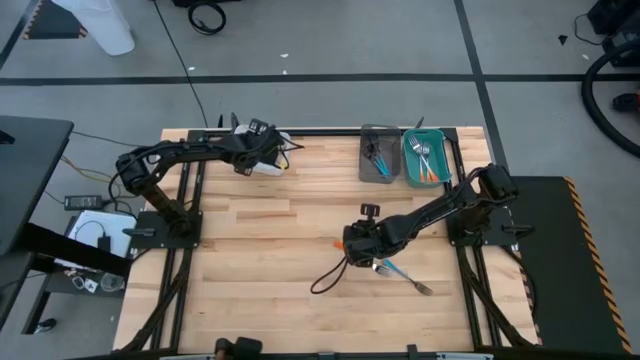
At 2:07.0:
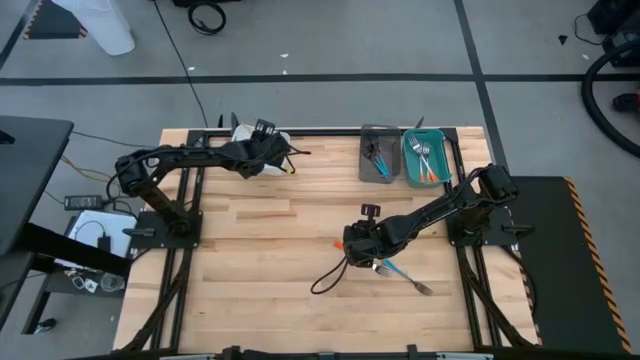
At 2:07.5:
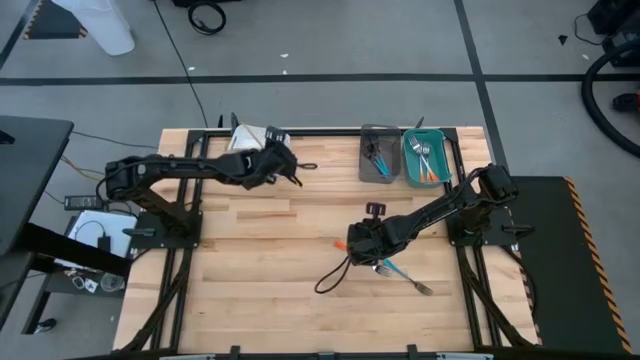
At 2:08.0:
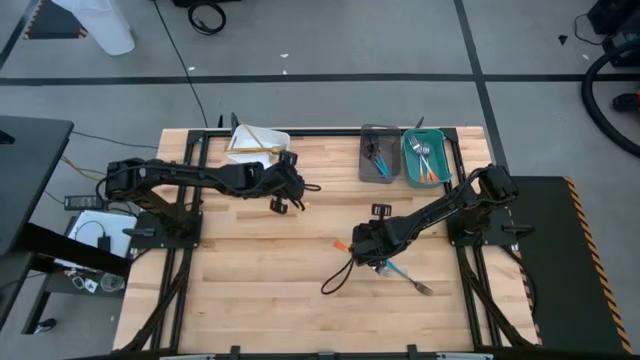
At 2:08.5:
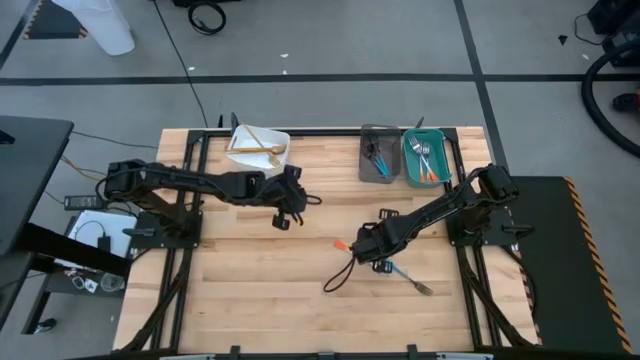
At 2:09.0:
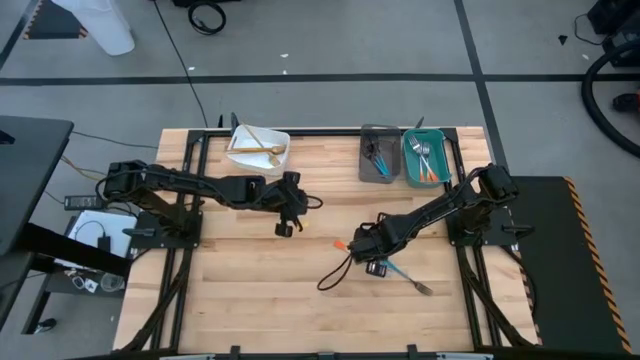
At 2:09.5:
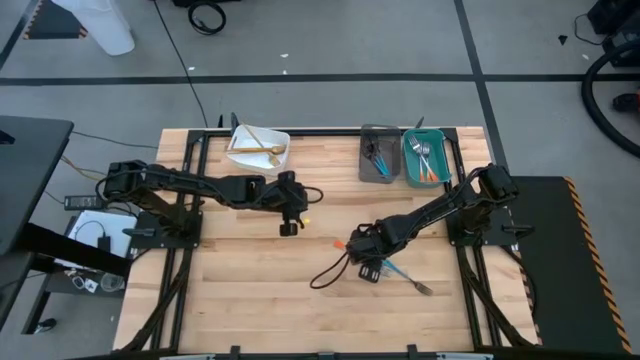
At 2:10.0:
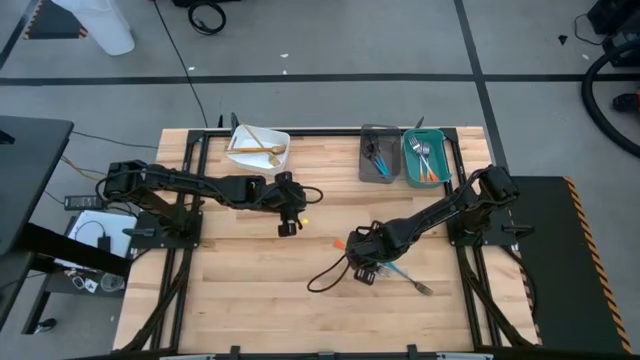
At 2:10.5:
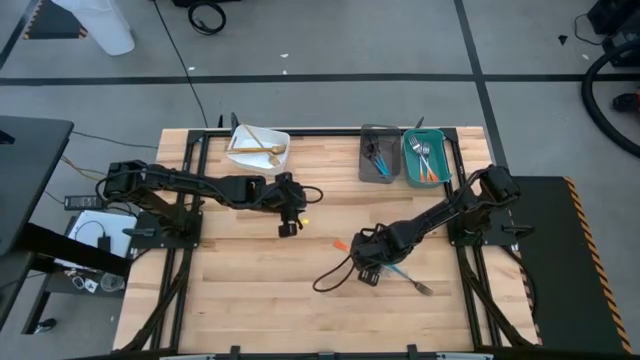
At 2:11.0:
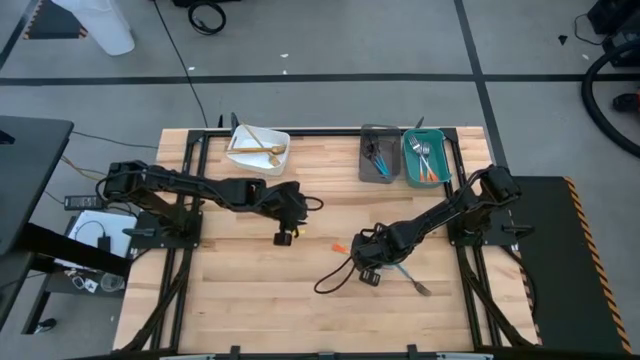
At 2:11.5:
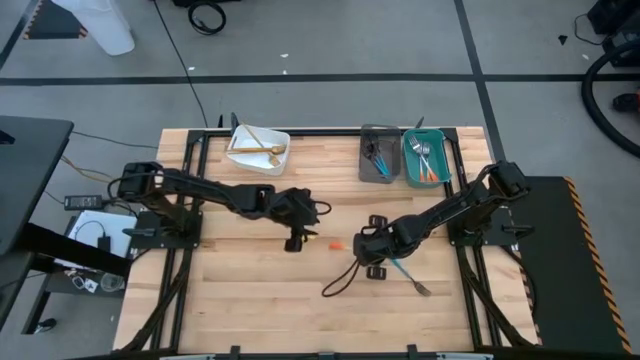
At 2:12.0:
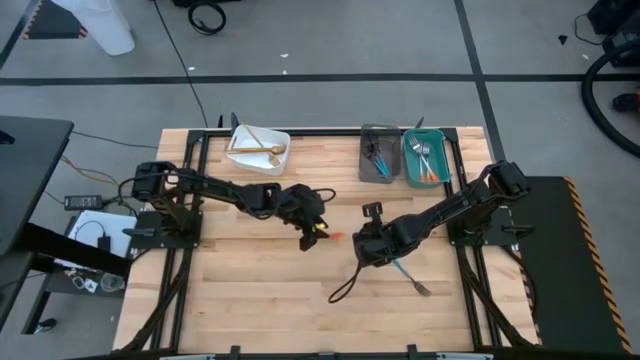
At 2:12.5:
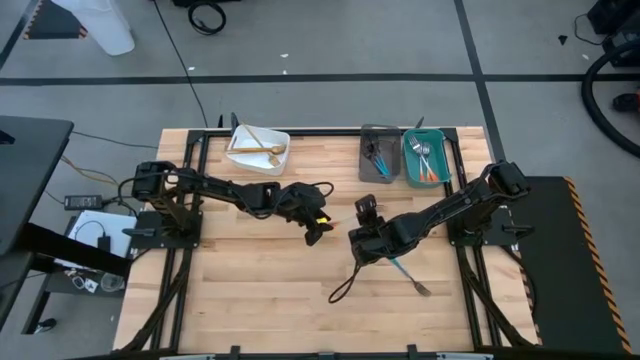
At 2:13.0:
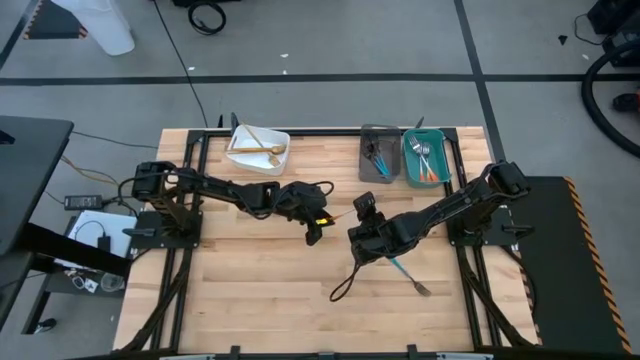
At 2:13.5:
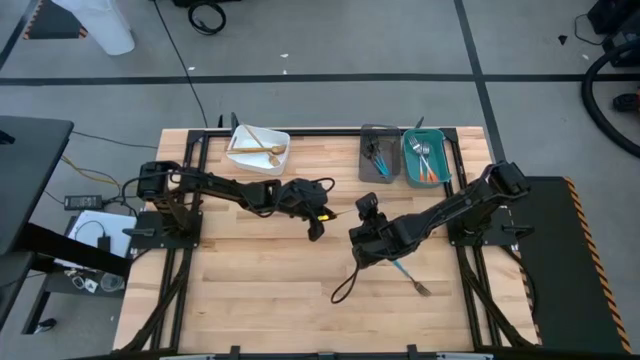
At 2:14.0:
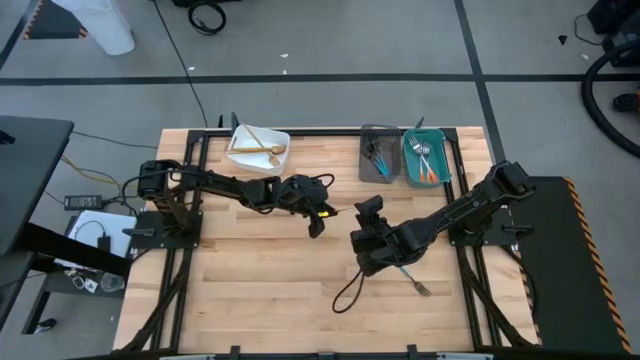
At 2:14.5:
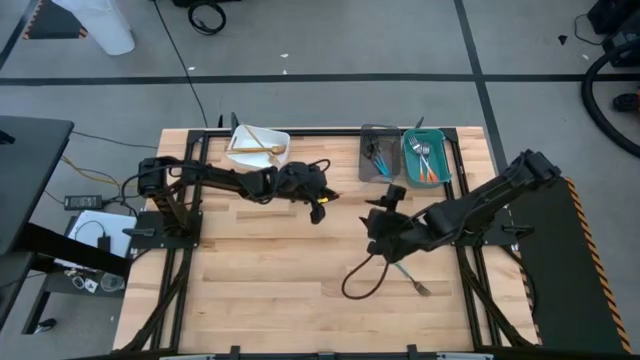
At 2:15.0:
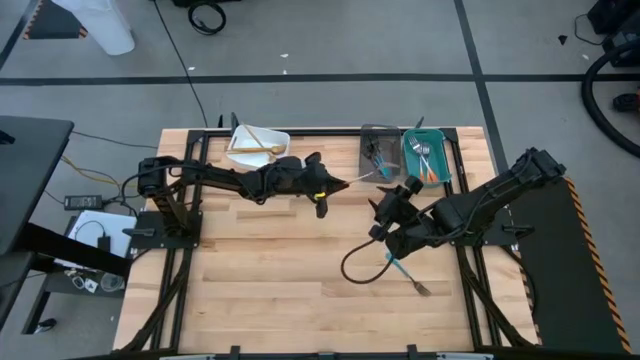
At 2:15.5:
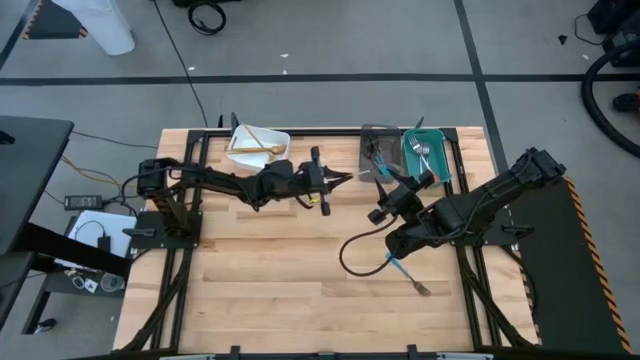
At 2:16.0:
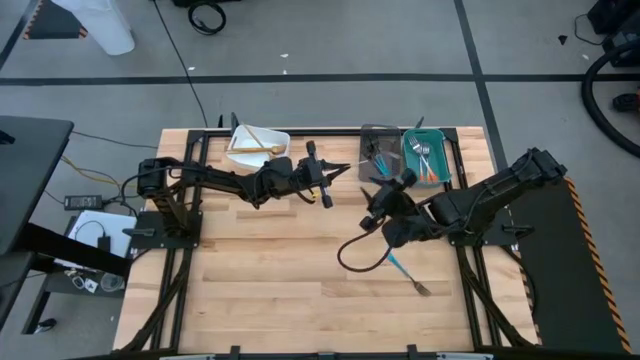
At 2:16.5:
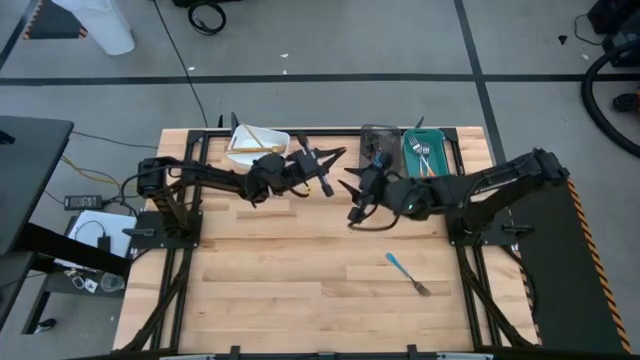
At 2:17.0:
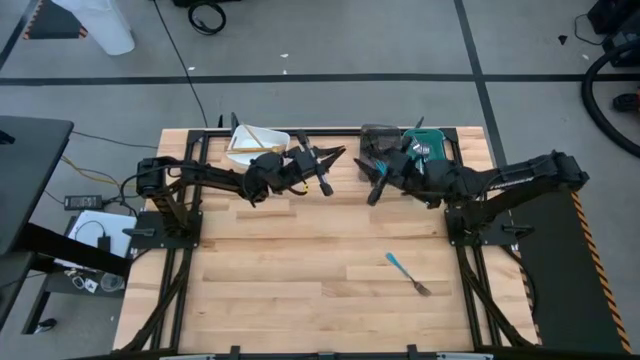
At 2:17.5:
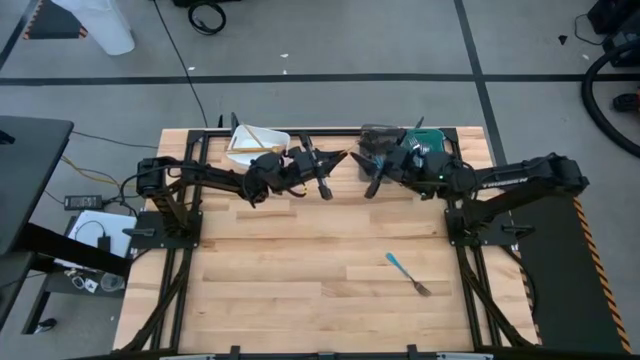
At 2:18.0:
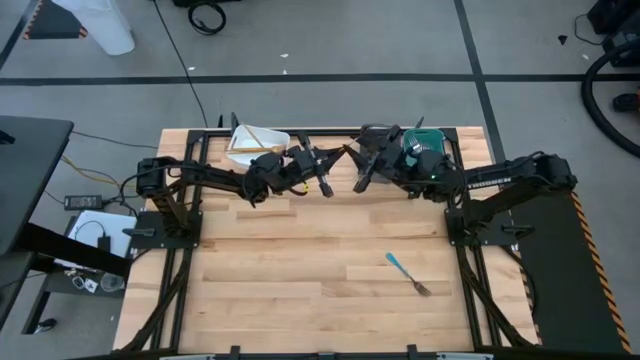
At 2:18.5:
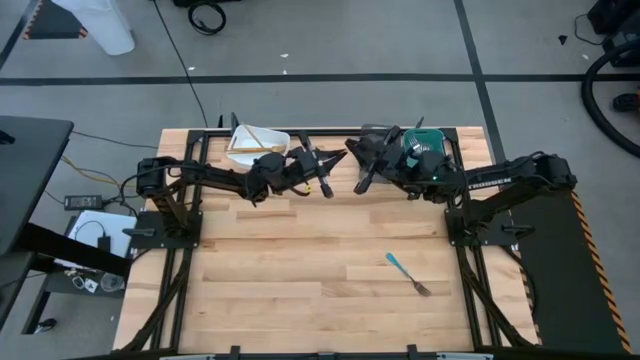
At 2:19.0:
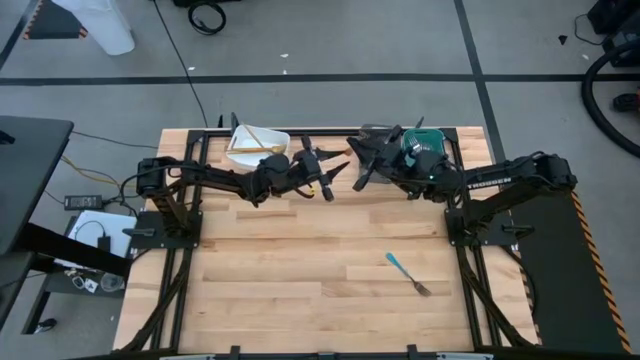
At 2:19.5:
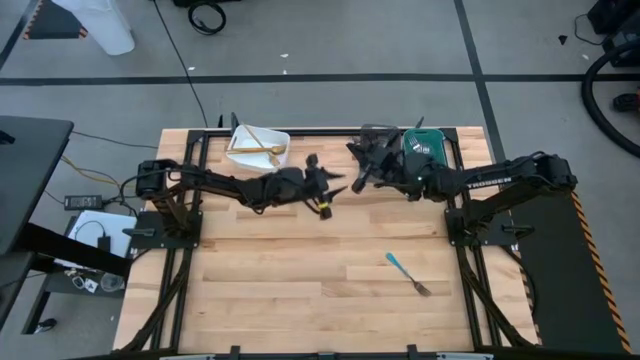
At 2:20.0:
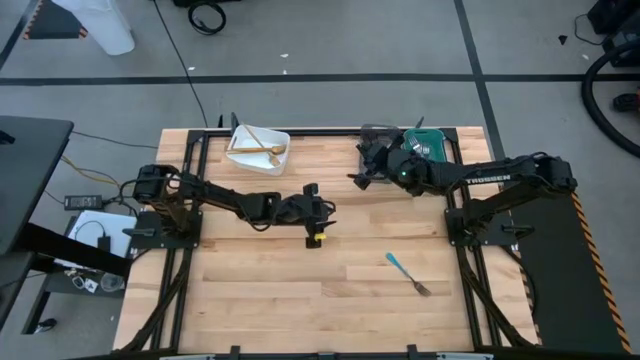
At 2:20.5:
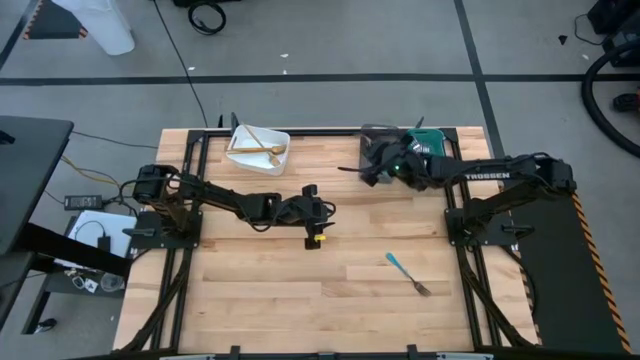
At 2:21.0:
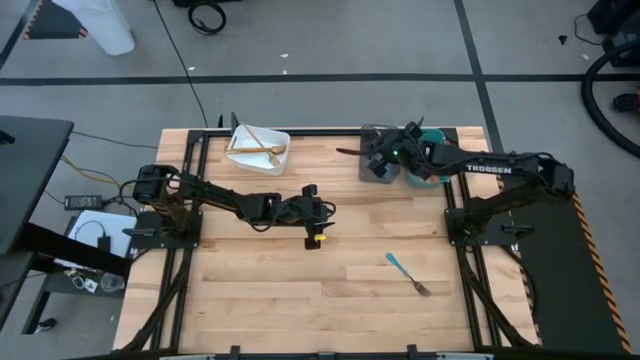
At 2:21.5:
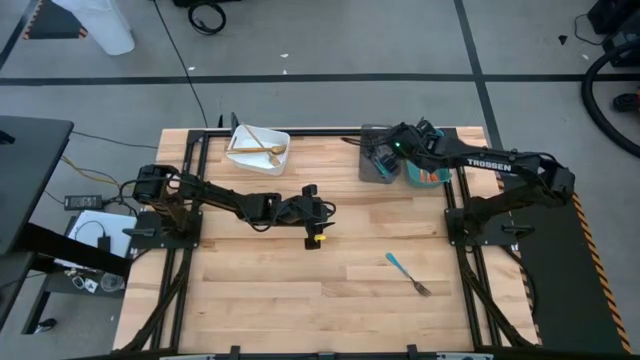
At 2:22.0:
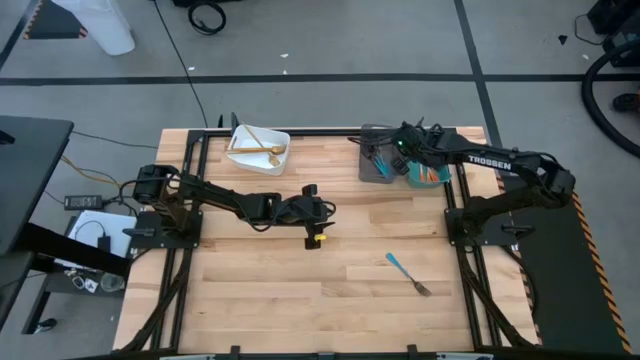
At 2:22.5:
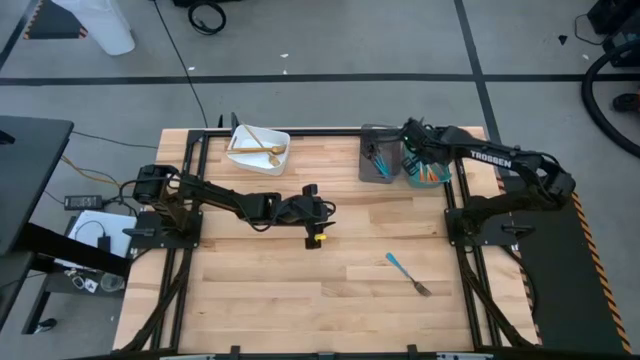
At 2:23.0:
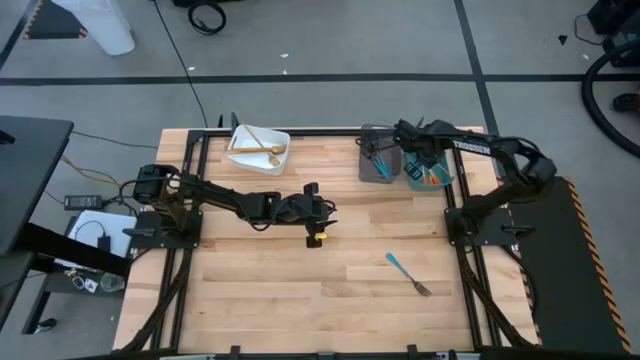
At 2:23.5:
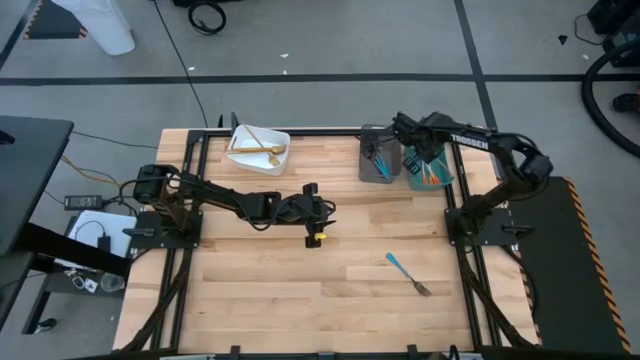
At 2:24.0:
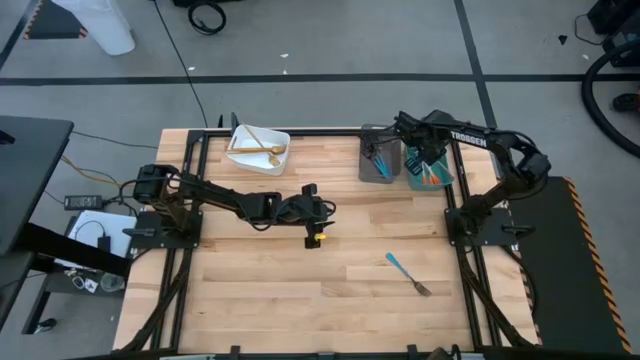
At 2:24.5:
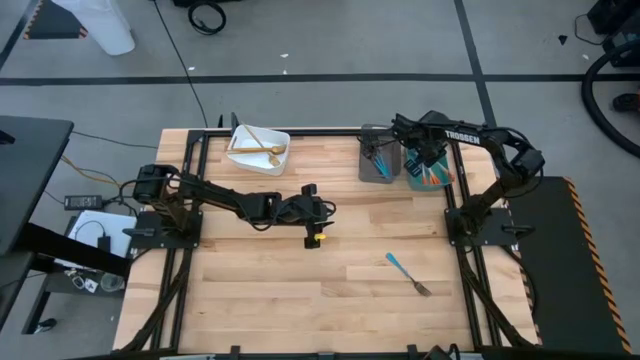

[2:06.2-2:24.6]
Task: Sort silverware by color (type)
Put the orange fork into the green bin

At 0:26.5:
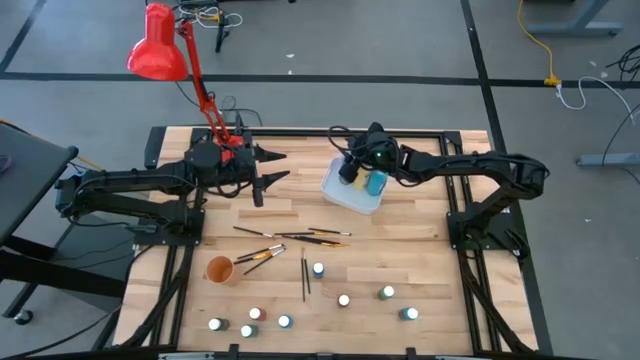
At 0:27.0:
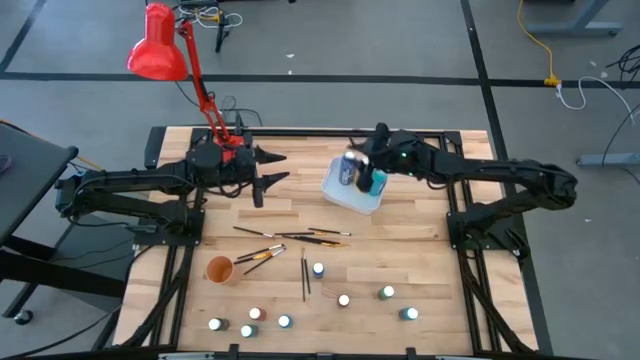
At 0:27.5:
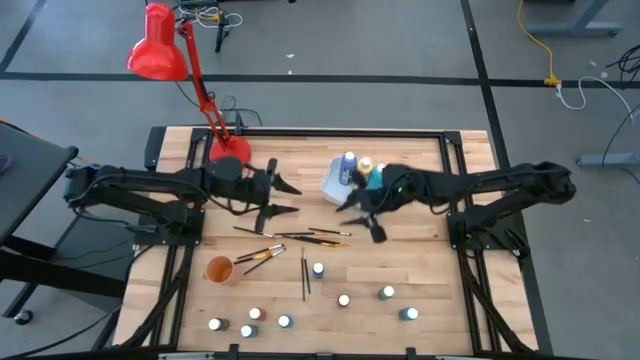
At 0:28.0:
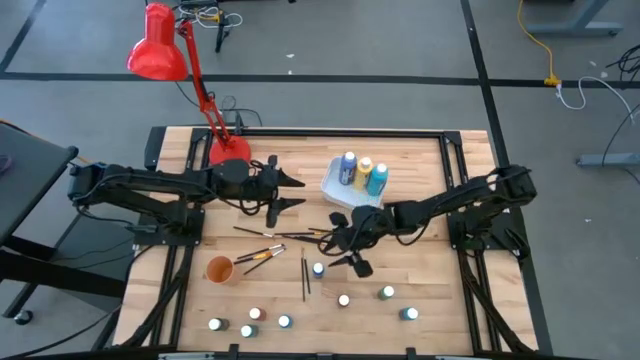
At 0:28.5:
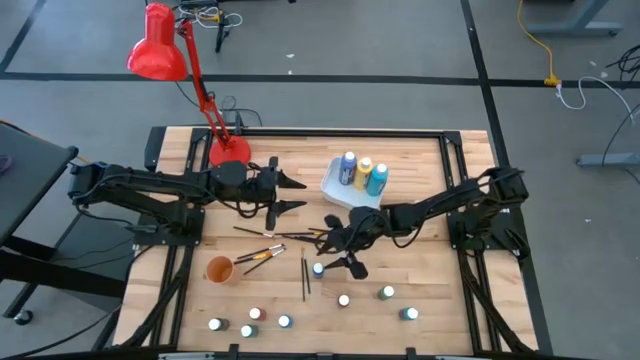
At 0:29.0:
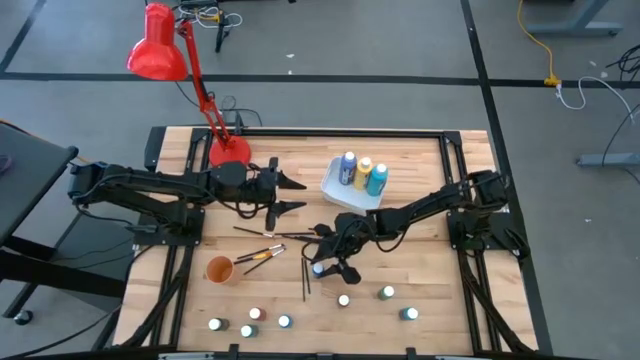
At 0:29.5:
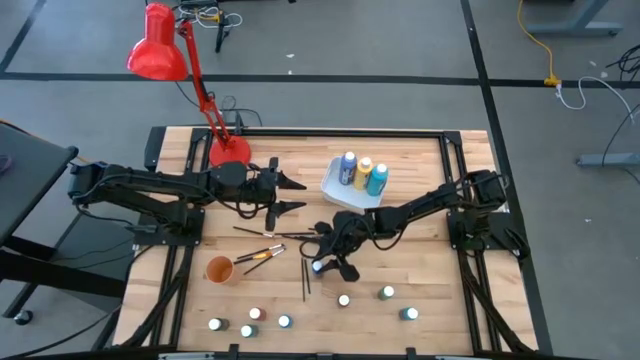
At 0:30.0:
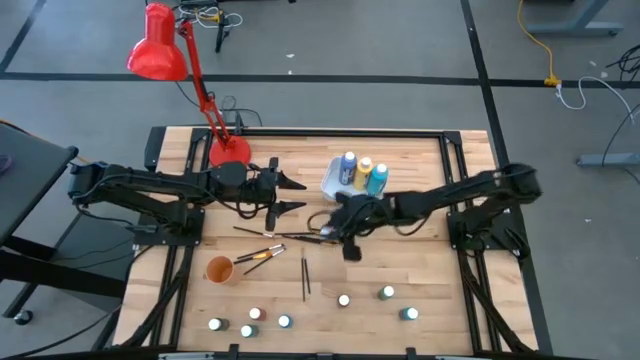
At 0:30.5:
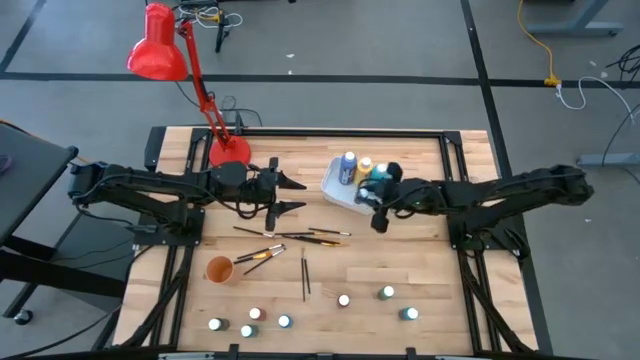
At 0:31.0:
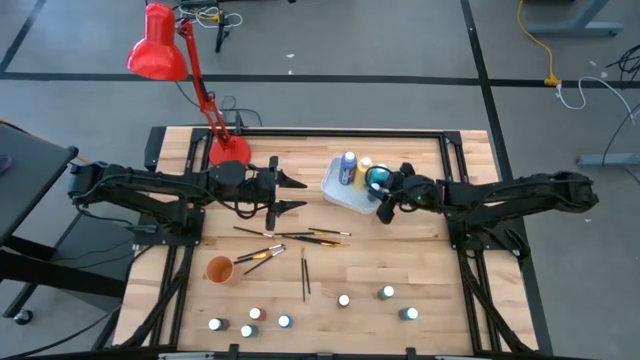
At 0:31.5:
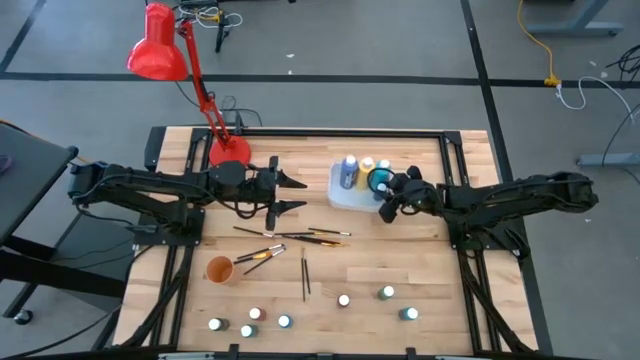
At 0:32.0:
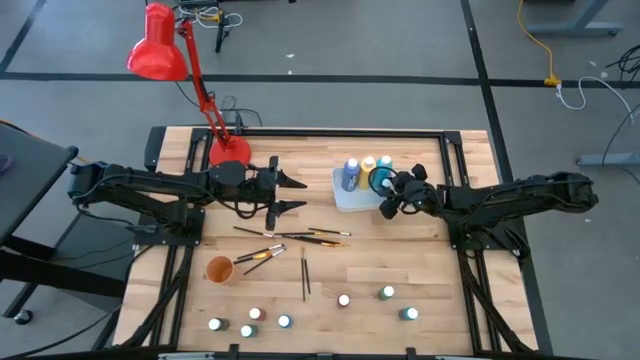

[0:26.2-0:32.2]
Task: Pick & Place Paint Supplies
Put the small blue paint bottle into the white bin
